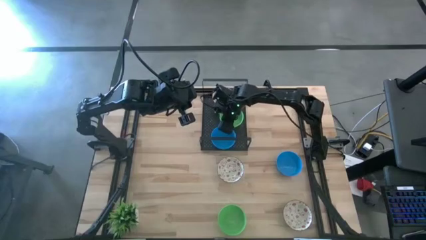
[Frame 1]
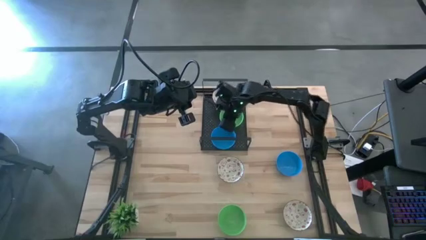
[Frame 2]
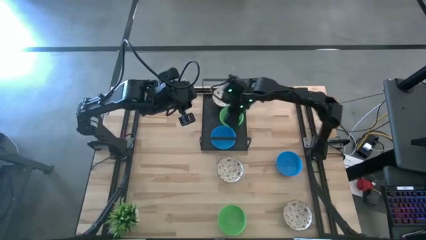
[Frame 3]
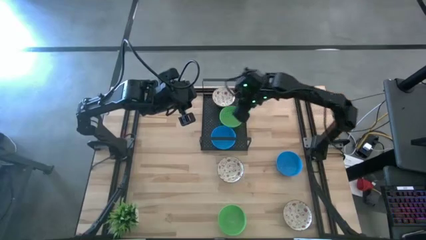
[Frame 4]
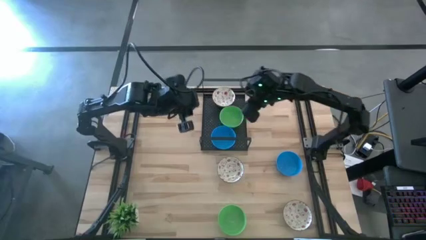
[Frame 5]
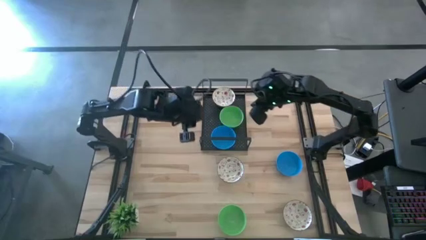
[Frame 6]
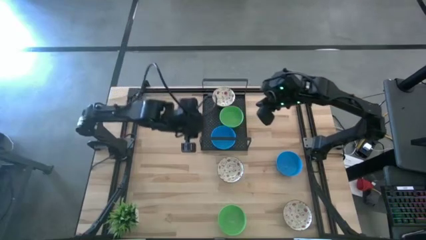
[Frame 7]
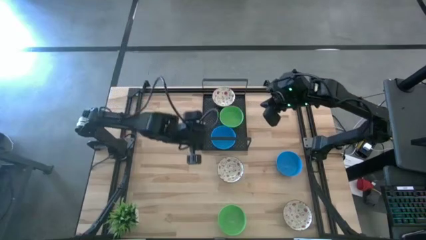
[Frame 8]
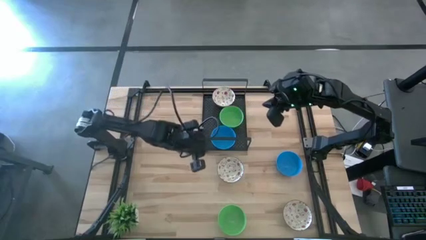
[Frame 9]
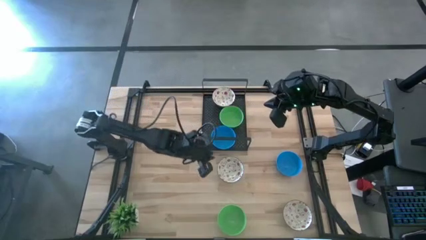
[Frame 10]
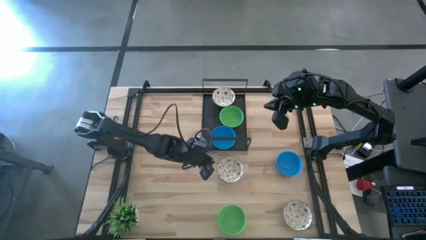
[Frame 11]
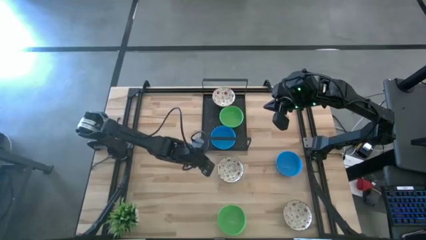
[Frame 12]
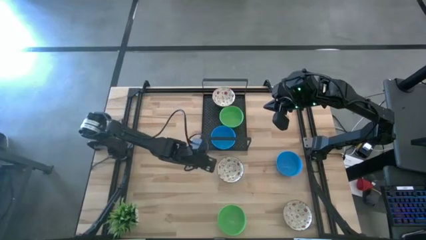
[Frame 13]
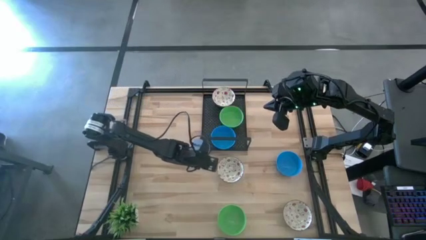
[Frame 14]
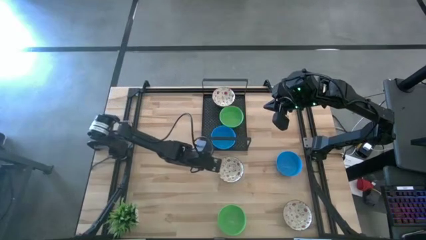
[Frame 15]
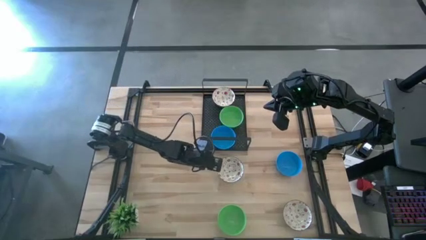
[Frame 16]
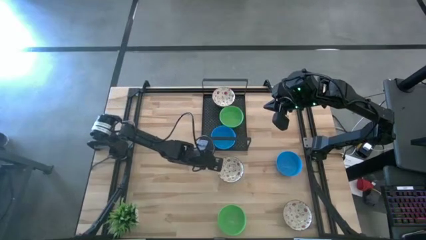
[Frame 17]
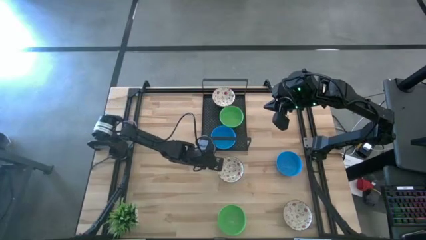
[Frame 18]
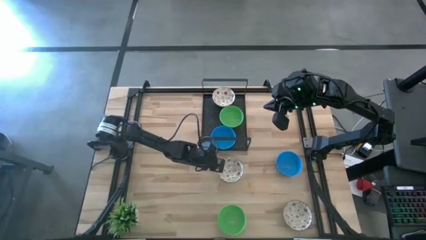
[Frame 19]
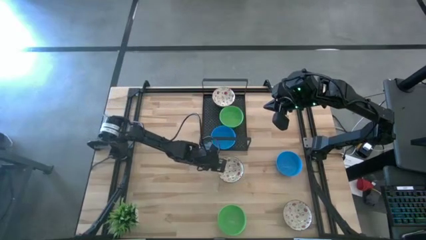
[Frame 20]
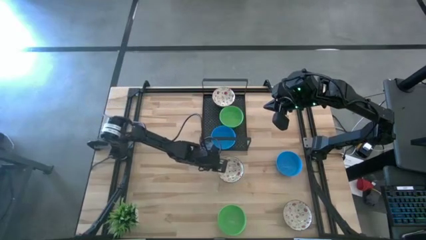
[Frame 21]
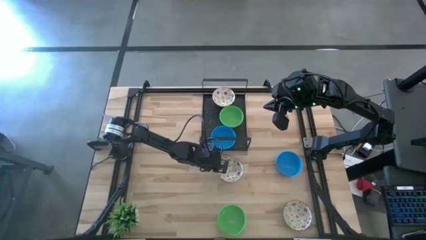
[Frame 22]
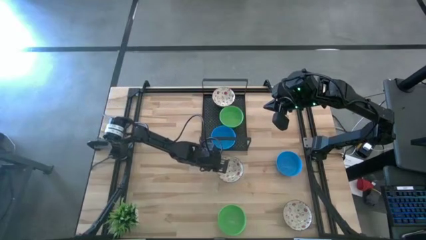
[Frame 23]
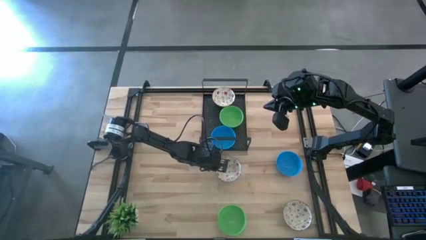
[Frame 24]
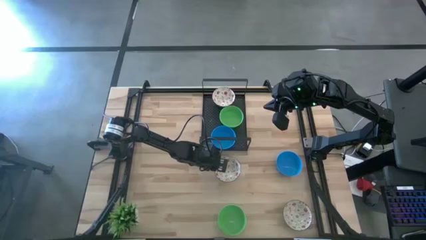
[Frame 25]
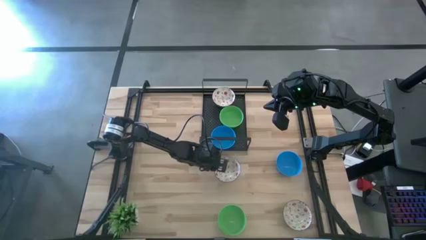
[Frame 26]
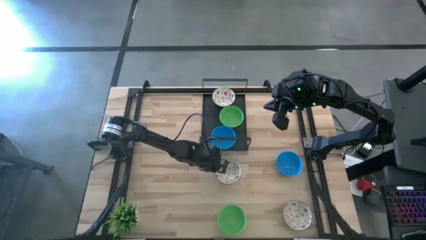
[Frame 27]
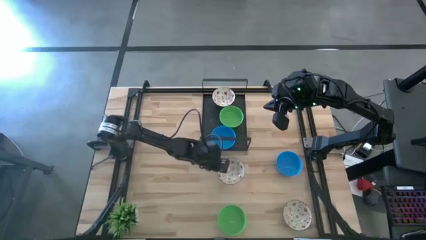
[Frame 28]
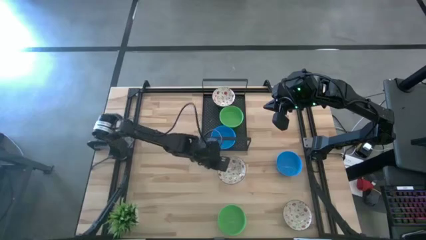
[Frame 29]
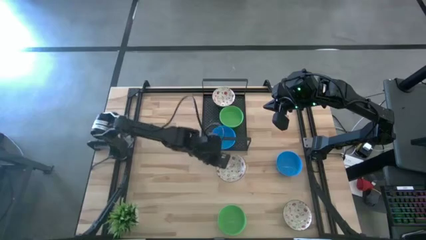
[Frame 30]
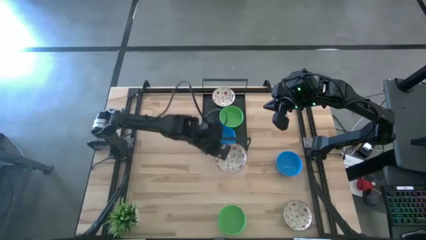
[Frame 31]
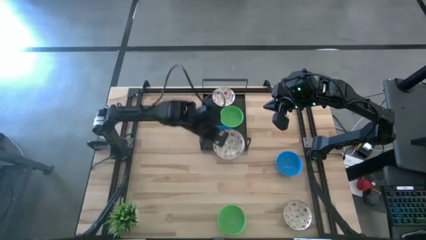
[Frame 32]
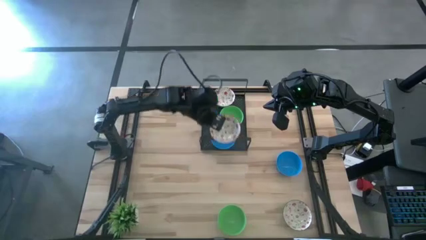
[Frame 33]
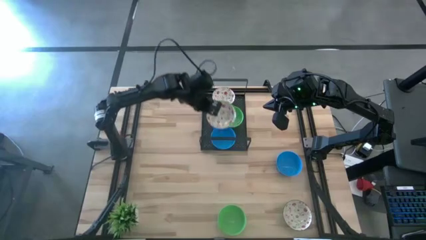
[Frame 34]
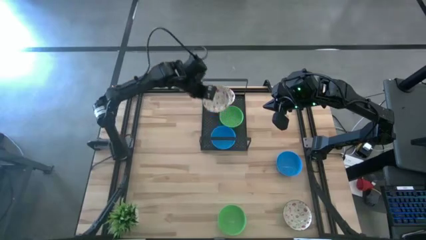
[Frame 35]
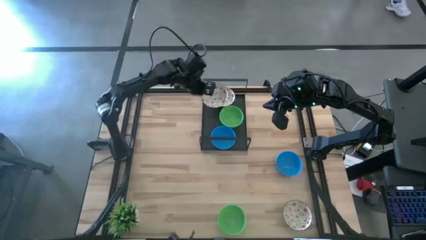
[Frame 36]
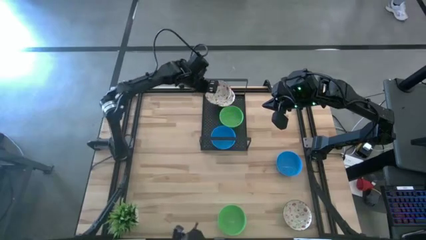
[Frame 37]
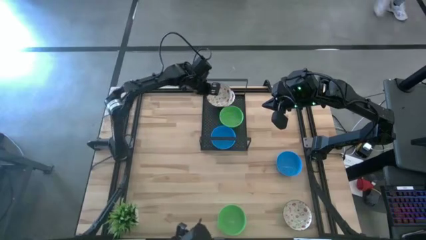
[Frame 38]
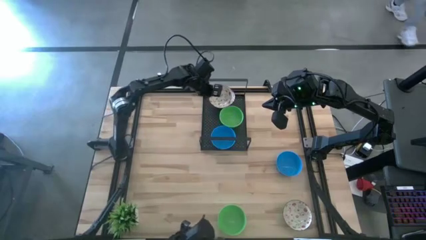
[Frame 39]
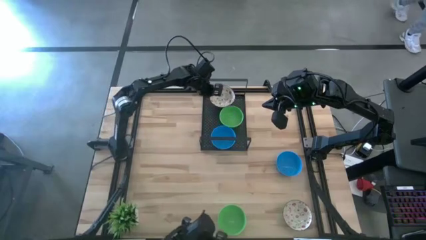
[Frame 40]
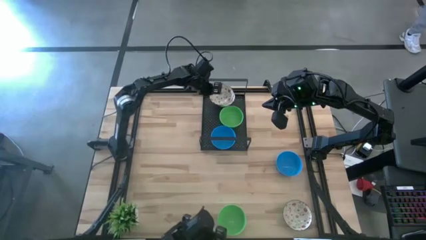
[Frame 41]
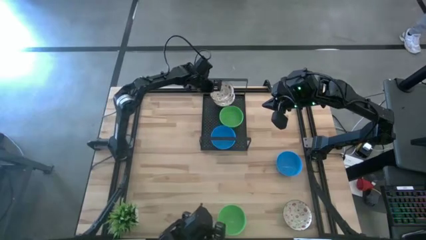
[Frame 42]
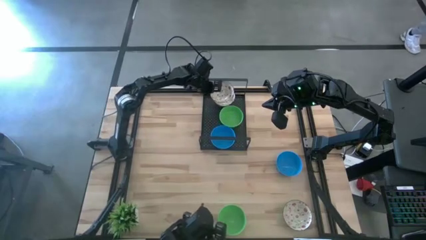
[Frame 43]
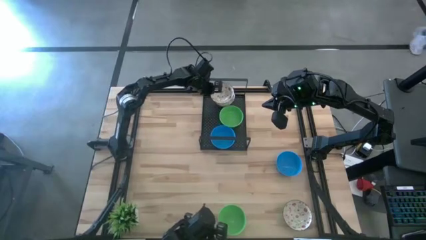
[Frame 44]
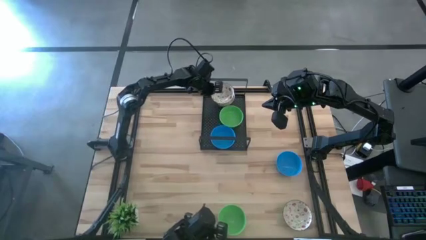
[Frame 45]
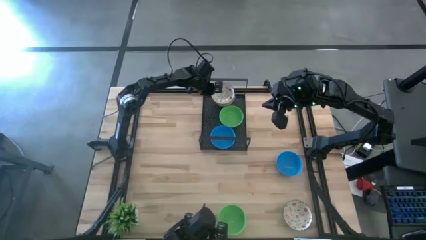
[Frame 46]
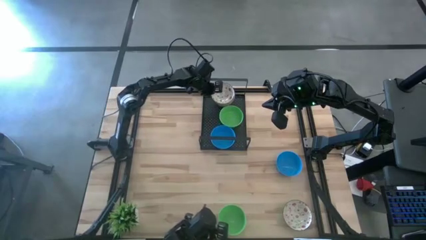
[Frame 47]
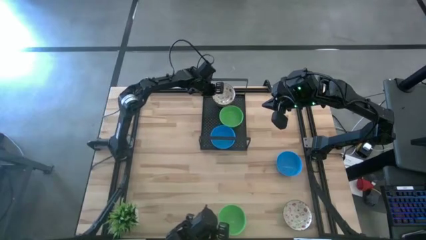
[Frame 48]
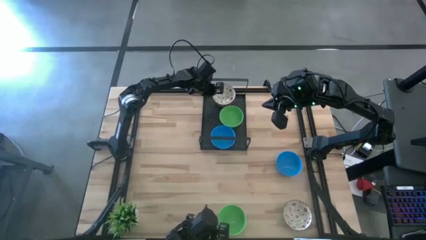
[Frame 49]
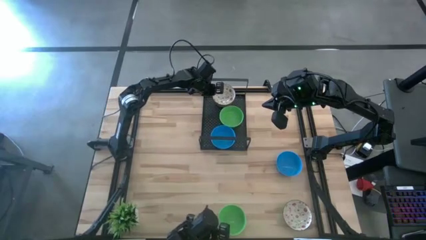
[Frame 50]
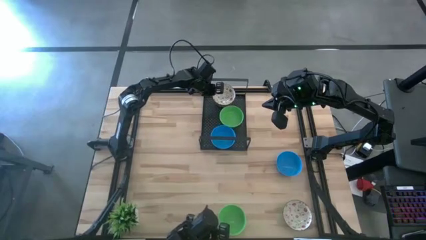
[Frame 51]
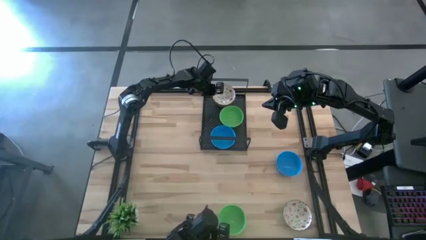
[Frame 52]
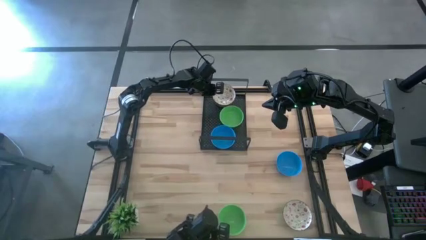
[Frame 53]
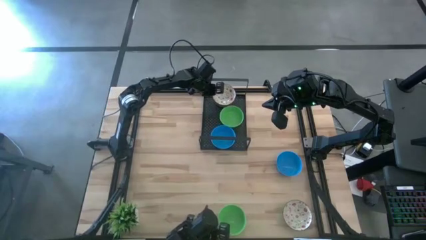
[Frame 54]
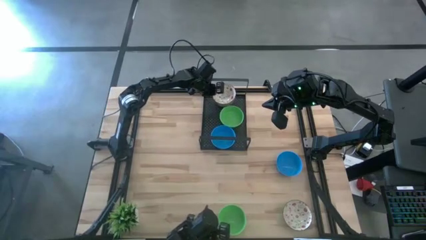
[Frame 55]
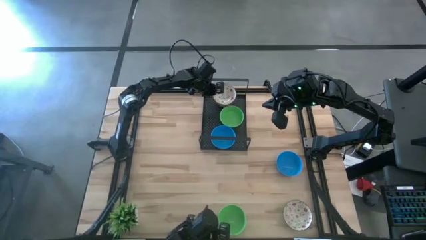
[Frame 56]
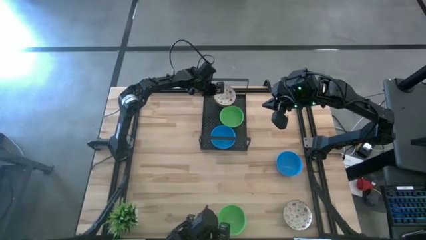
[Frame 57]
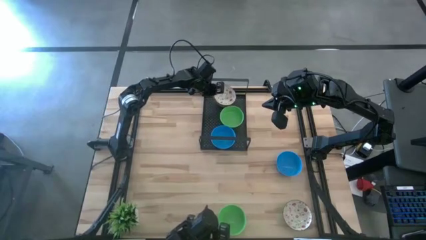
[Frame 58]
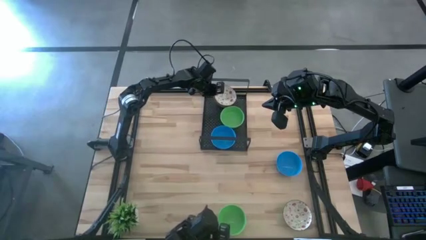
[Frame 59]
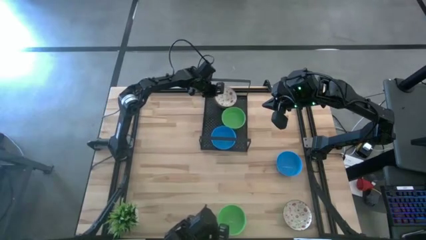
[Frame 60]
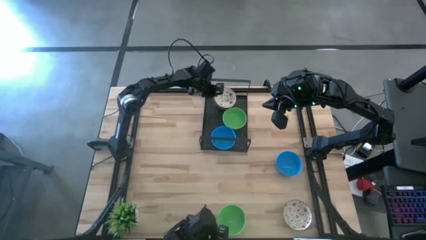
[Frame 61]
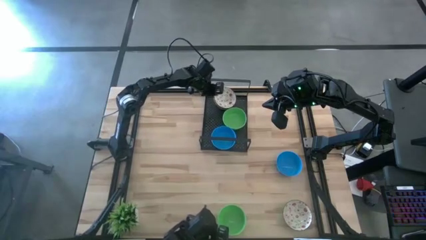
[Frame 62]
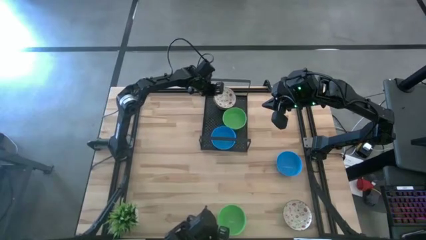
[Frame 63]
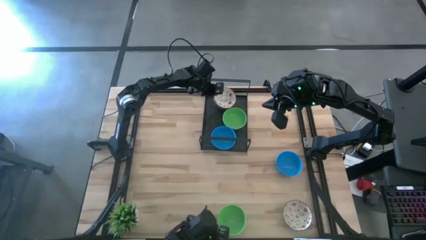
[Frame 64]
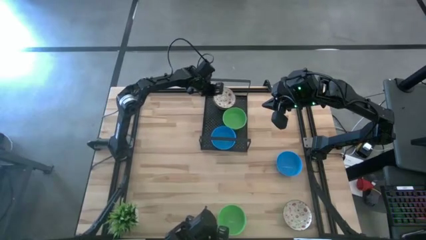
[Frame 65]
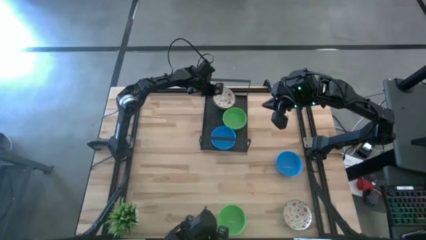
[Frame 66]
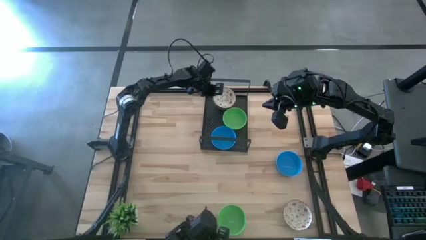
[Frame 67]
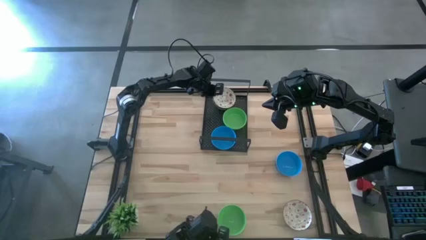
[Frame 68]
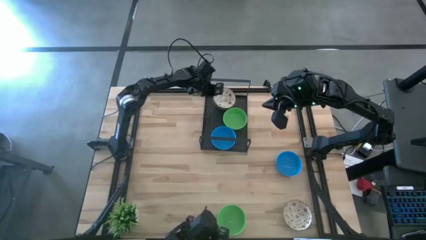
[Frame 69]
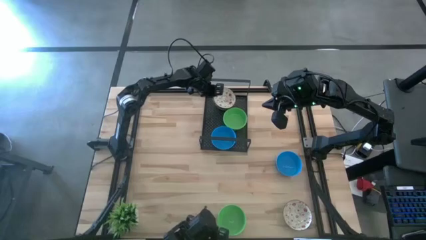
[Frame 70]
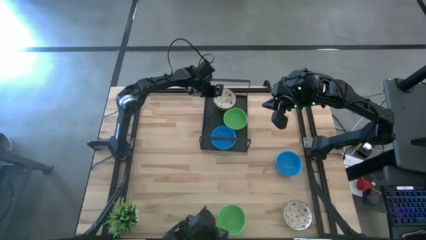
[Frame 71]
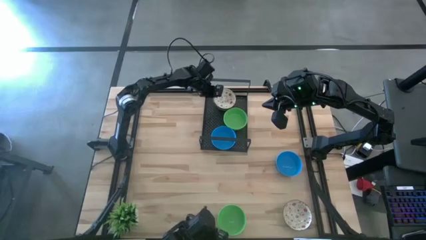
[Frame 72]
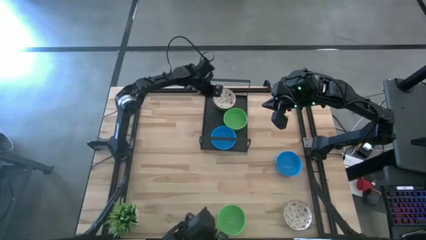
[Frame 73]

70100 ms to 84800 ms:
Task: Pick & Place Mini bowls
Stack the top white bowl on the white bowl on the shelf
